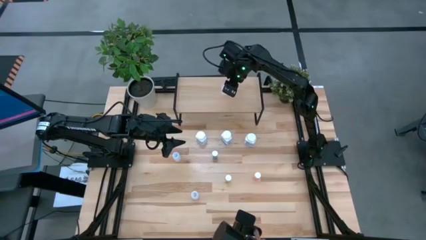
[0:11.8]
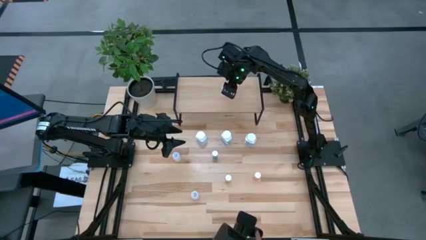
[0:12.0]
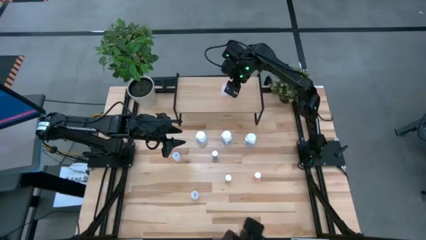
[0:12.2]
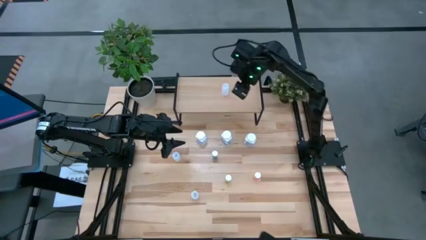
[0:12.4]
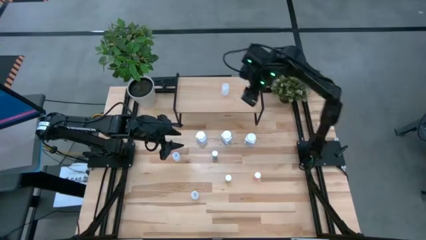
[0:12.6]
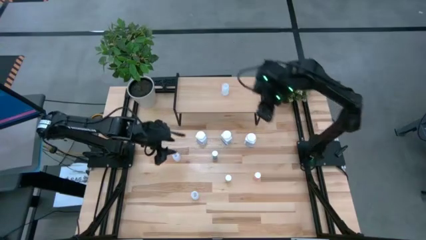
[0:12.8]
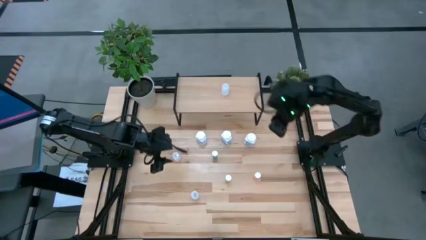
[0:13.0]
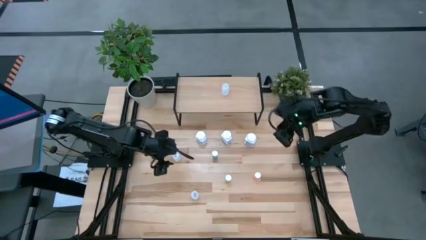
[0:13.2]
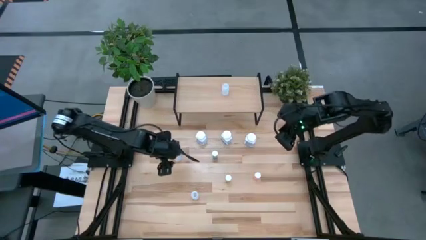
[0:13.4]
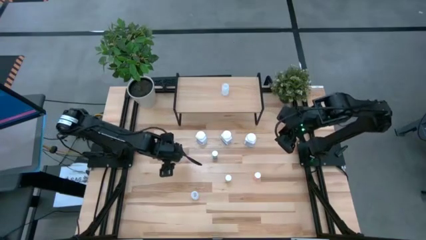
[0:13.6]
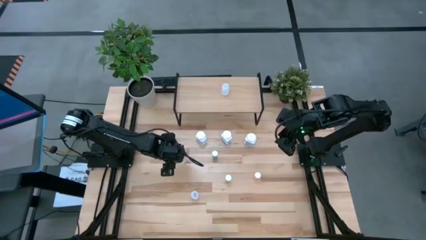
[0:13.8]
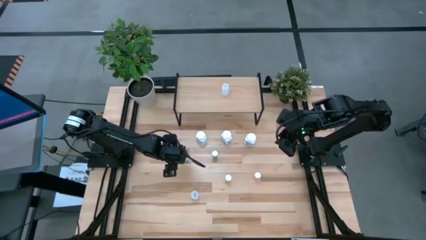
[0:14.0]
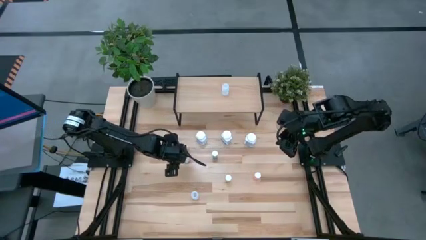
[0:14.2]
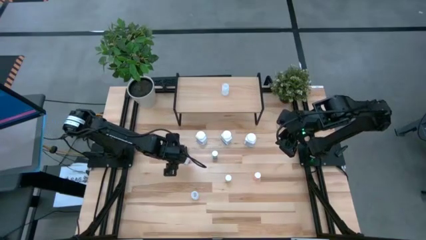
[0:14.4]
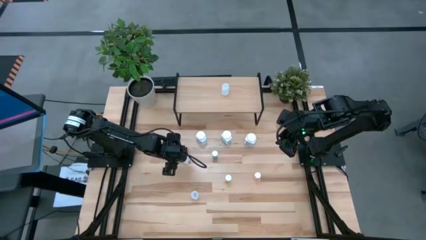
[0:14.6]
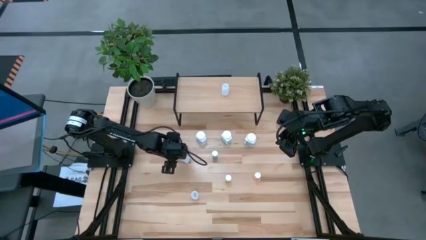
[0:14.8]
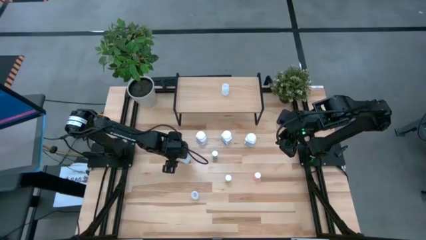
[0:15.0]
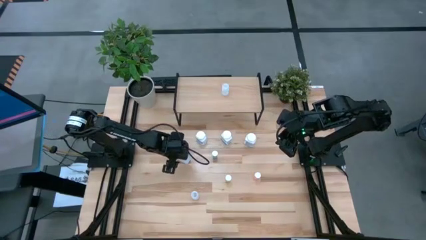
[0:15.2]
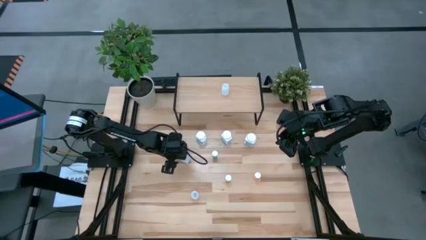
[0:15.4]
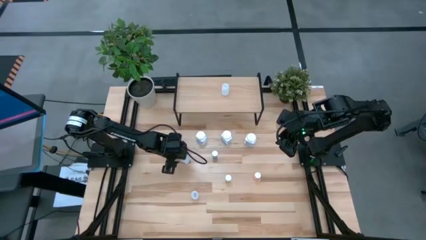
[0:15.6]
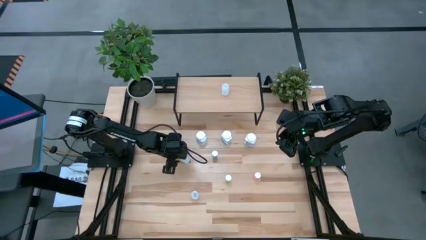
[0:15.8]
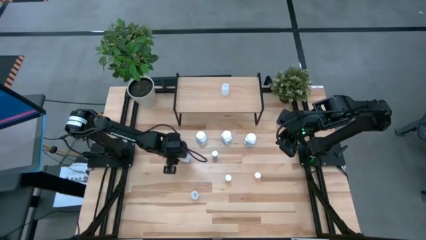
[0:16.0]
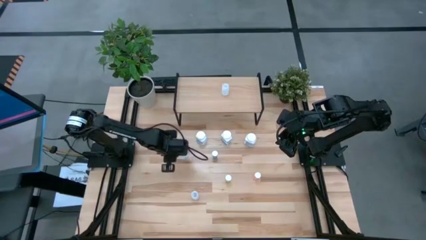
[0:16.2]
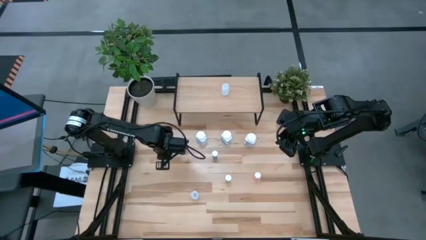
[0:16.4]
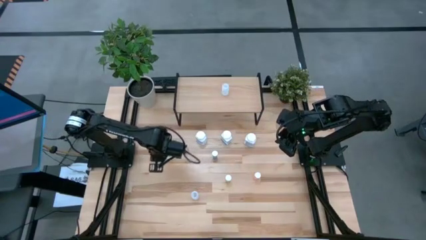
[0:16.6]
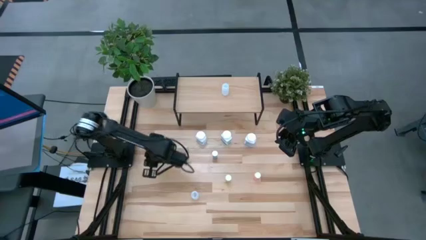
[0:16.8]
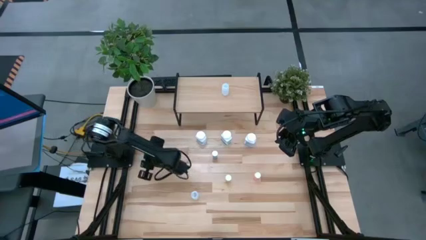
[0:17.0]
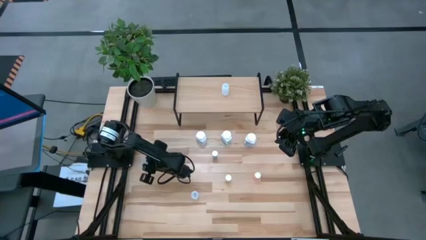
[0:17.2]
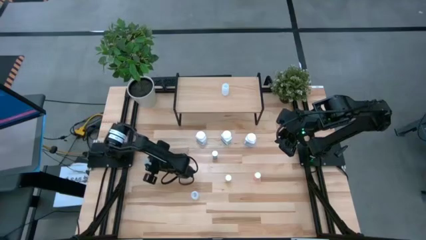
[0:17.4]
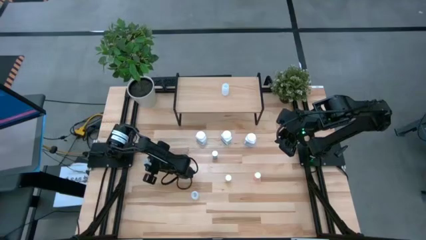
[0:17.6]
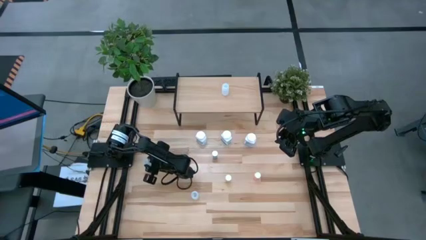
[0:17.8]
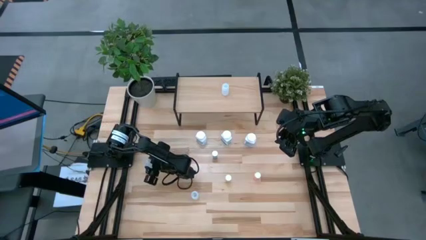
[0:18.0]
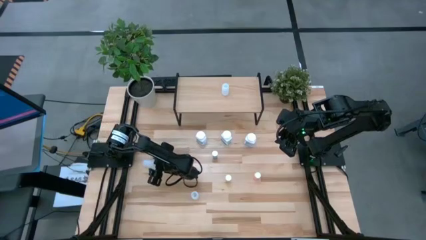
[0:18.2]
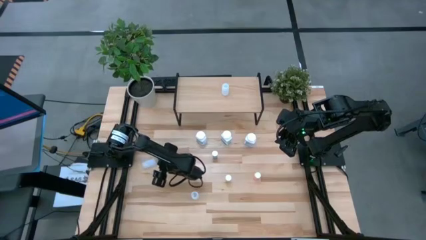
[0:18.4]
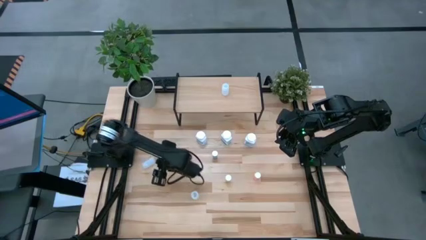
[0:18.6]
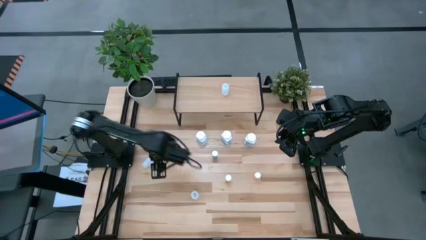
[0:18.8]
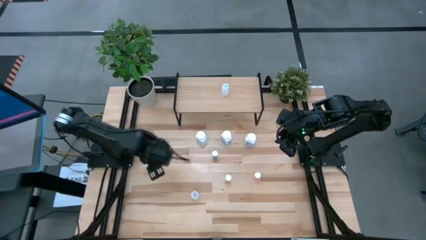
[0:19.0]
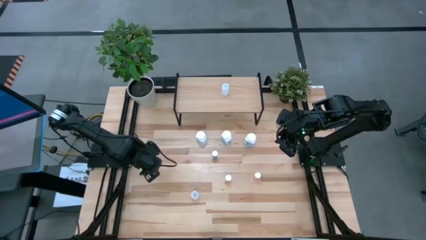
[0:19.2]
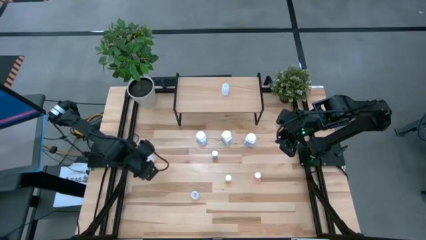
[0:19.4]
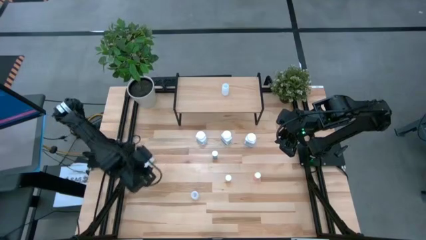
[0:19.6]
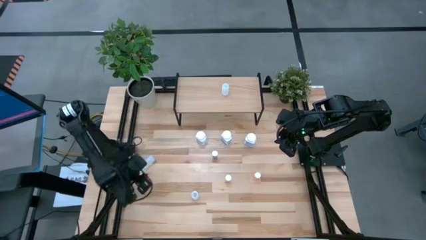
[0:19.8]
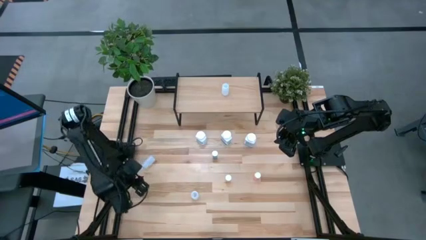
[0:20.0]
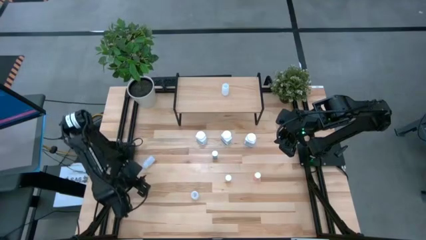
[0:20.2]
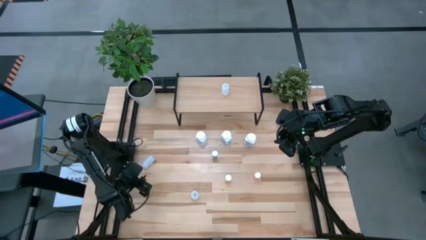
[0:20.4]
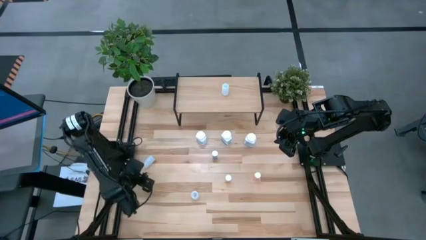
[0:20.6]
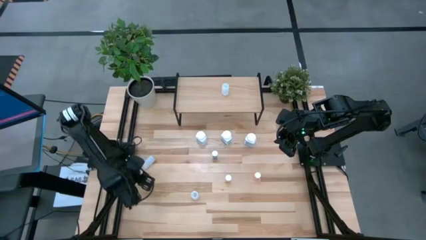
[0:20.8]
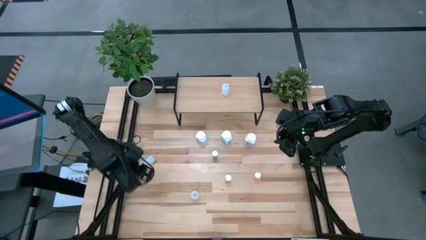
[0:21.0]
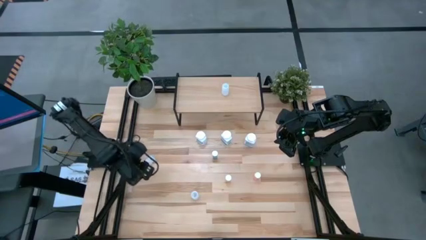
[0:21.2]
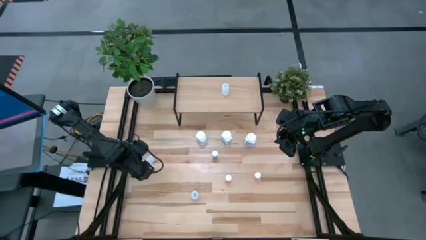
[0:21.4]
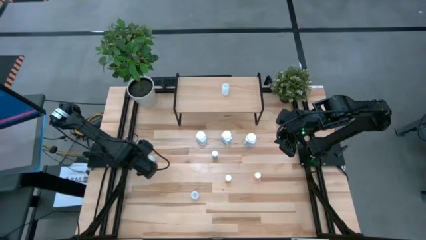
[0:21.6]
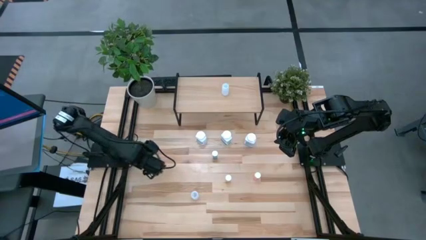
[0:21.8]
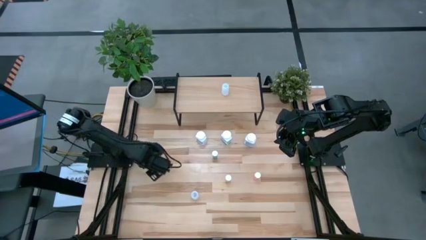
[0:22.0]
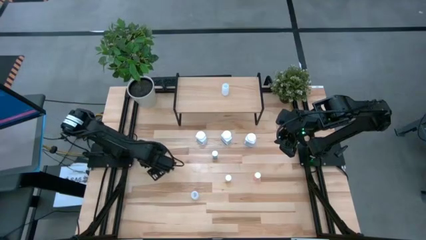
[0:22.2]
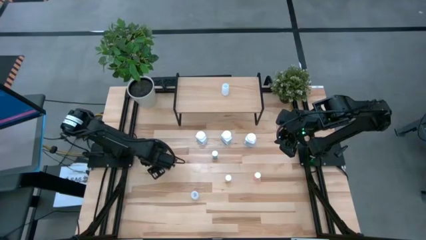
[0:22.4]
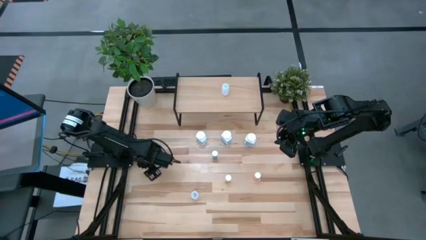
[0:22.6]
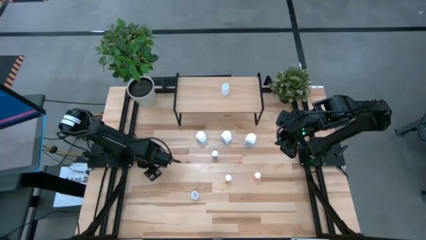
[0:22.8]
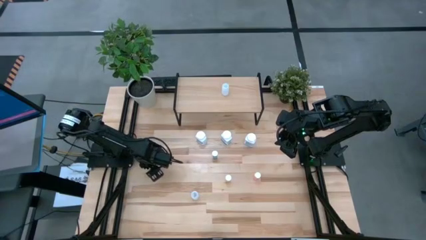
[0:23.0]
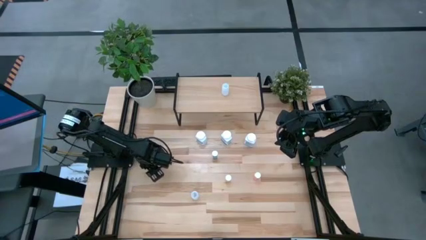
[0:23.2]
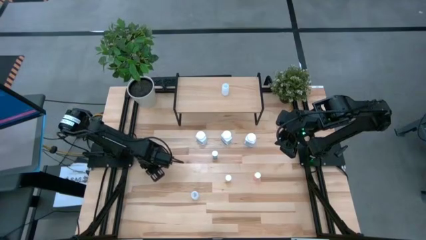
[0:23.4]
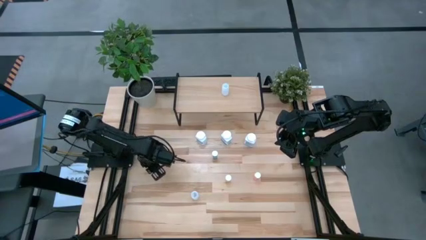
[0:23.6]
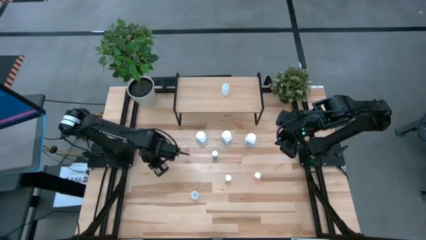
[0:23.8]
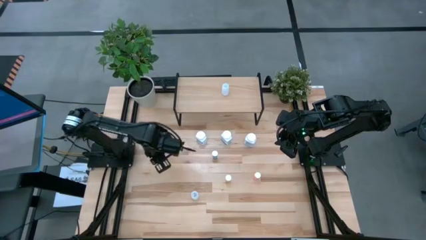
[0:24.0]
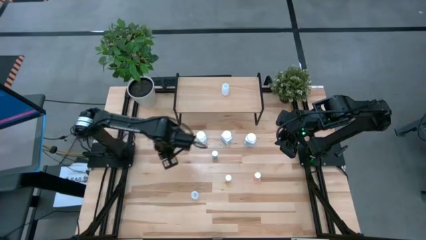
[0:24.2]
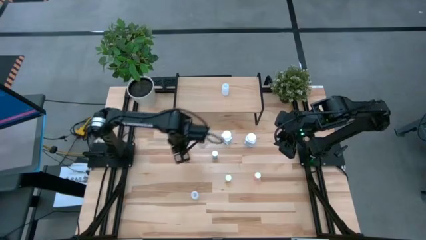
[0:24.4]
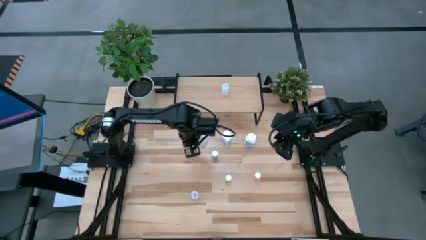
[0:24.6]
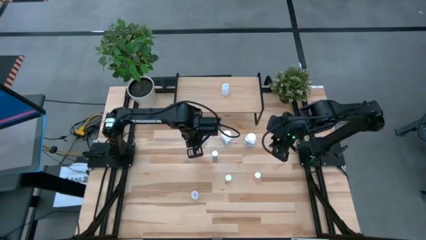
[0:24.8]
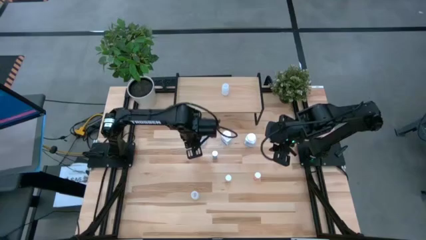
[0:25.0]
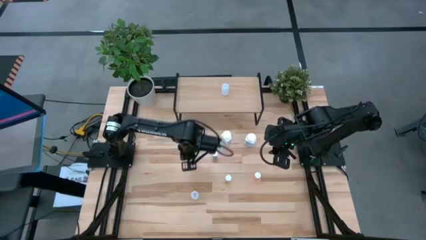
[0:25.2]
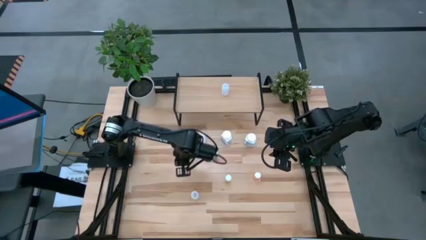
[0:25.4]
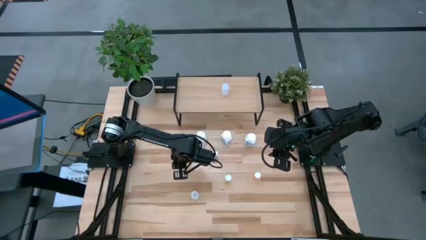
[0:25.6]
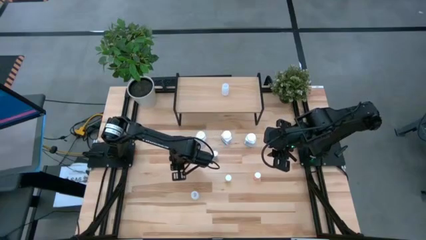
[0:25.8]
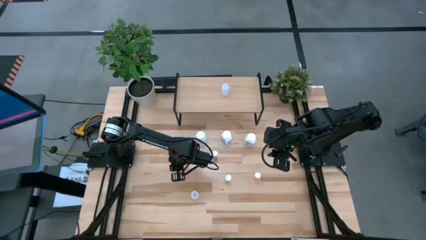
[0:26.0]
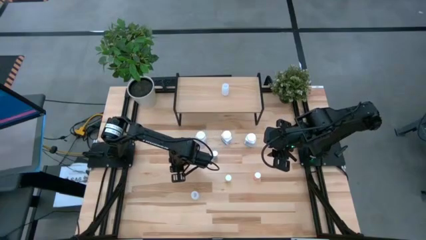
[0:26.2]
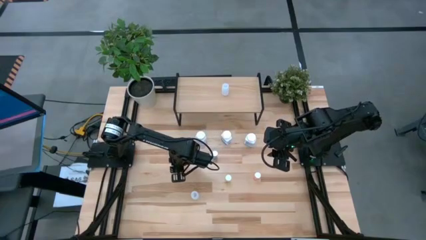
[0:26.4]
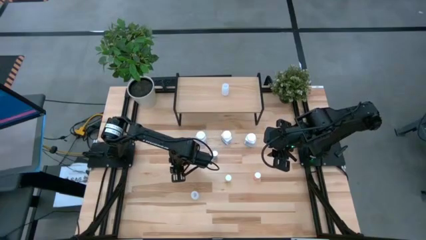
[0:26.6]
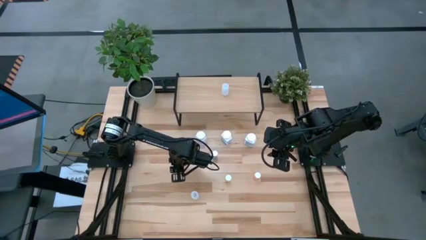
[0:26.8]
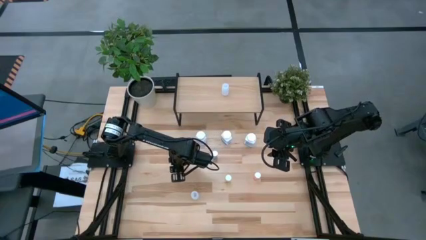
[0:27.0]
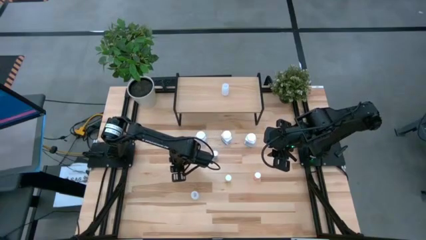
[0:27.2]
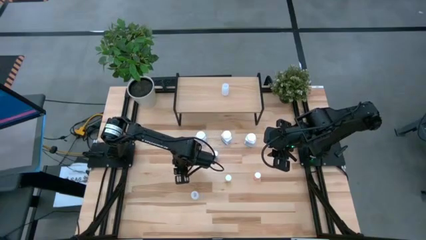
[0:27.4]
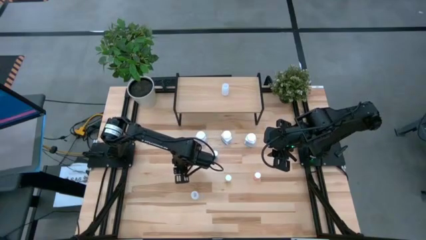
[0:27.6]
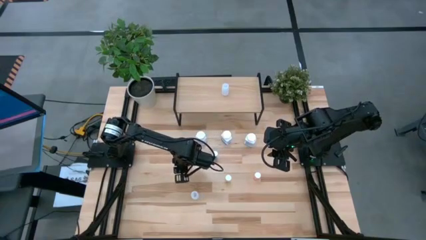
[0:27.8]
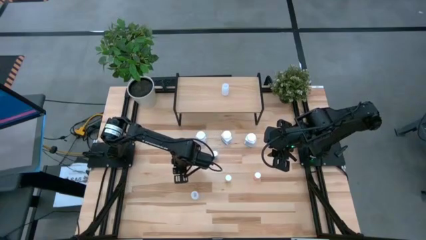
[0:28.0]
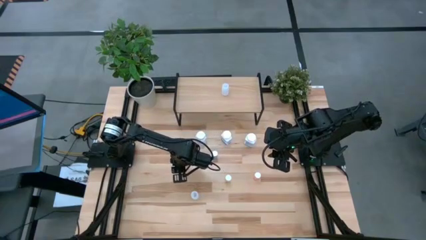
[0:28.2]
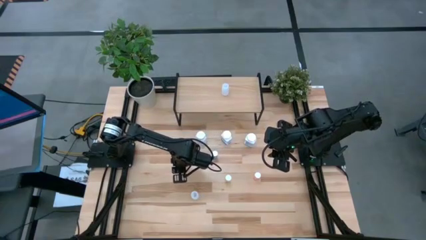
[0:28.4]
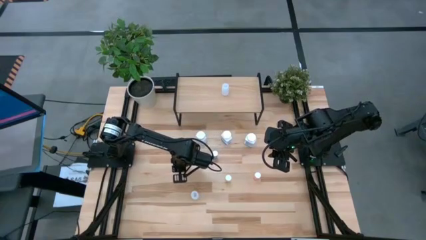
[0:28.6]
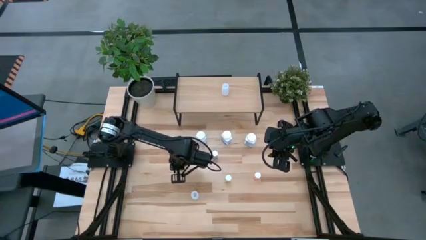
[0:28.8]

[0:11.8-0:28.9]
Task: Pick and place medicine bottles onto shelf by color
Put the top white pill bottle on the shelf
